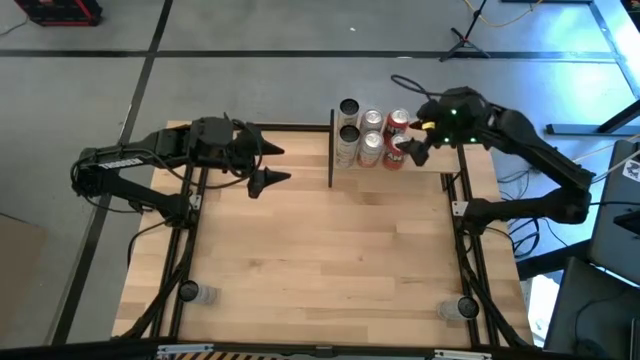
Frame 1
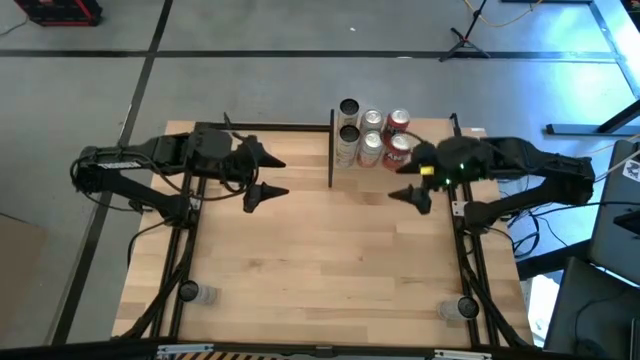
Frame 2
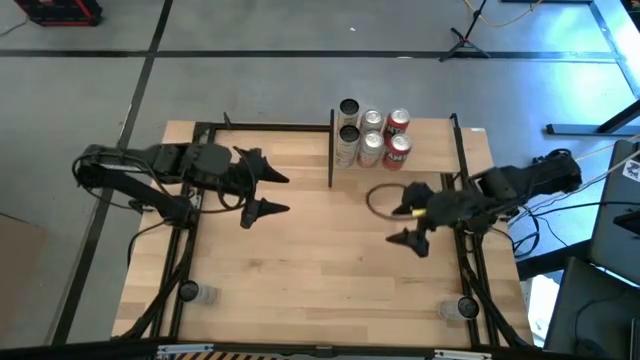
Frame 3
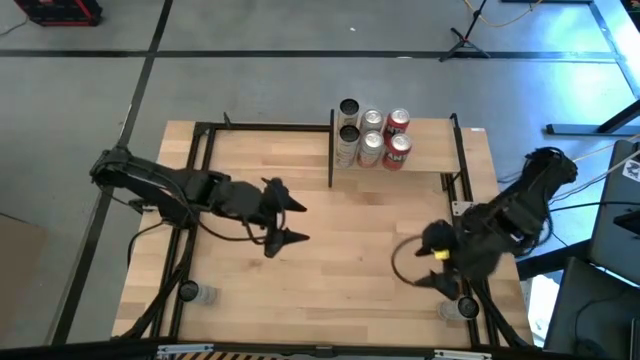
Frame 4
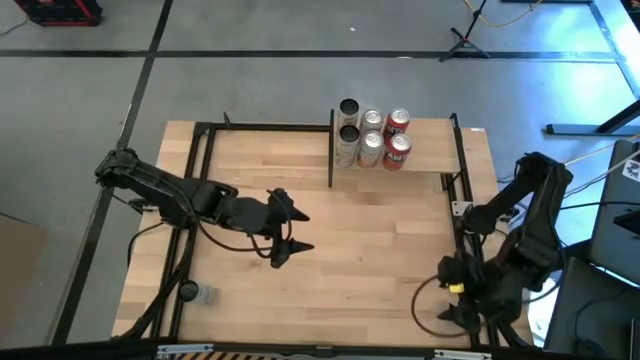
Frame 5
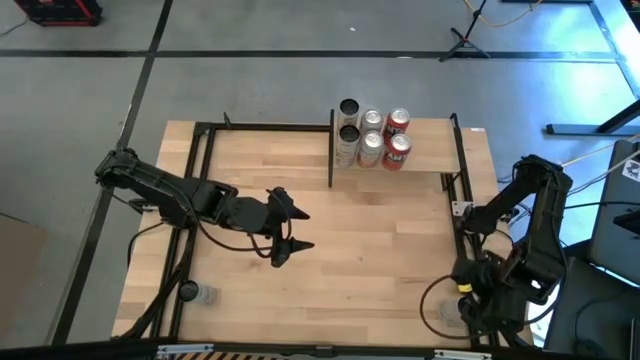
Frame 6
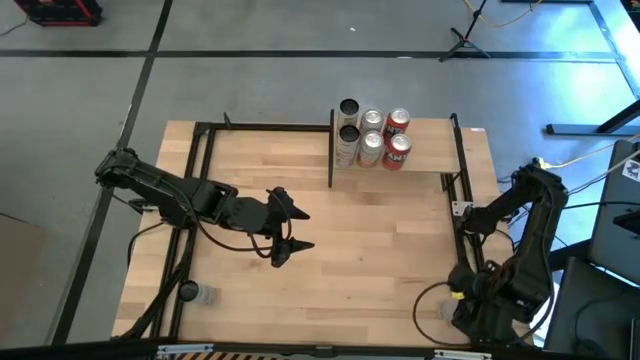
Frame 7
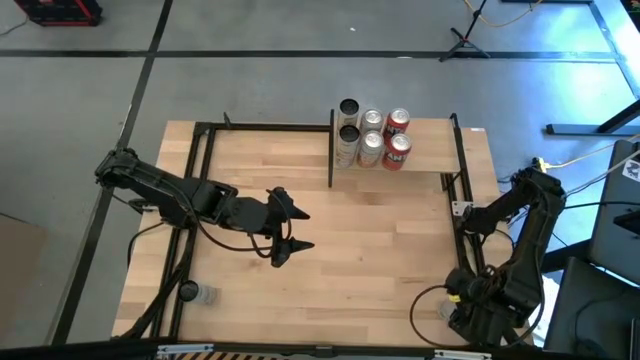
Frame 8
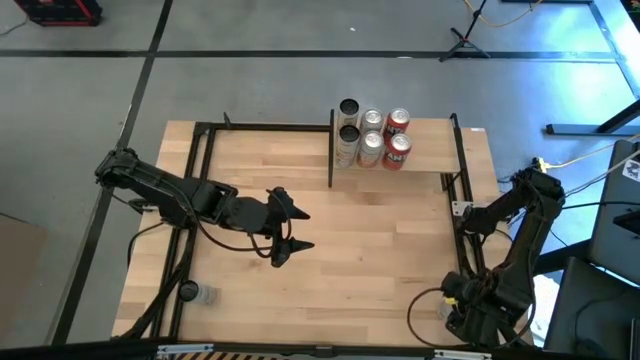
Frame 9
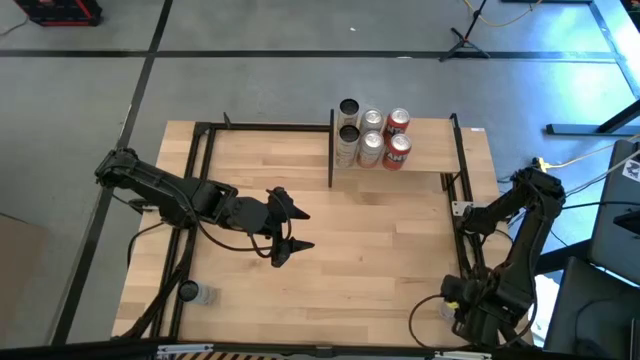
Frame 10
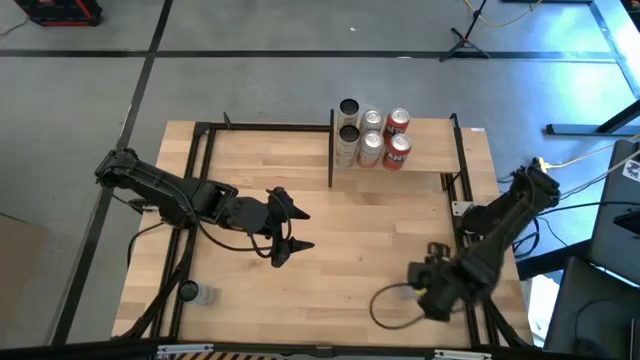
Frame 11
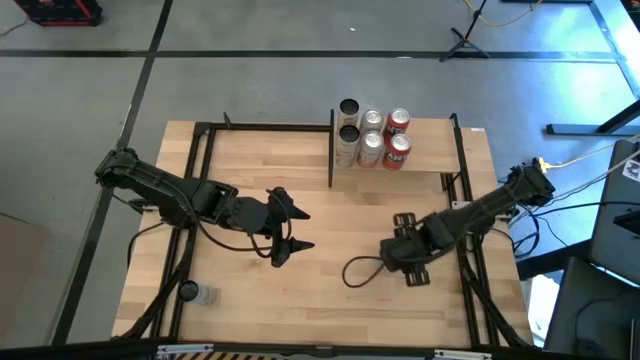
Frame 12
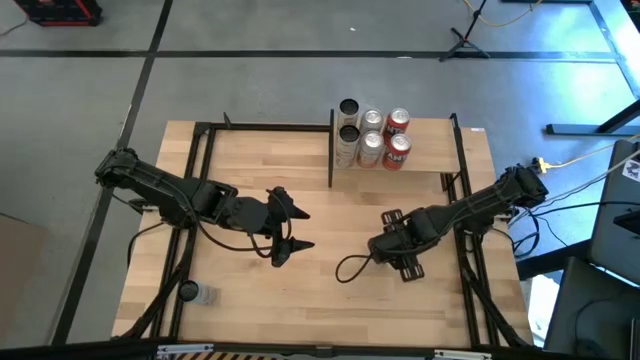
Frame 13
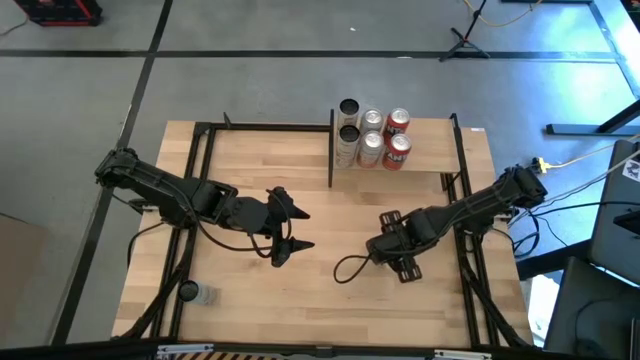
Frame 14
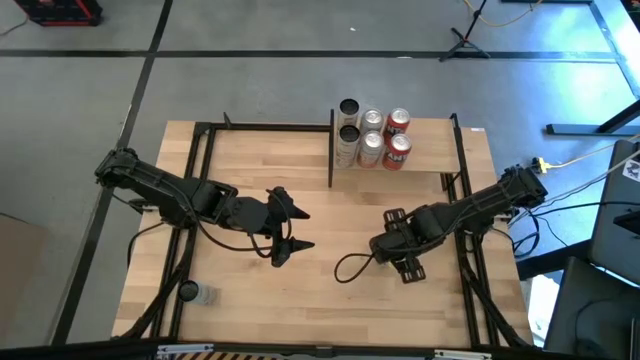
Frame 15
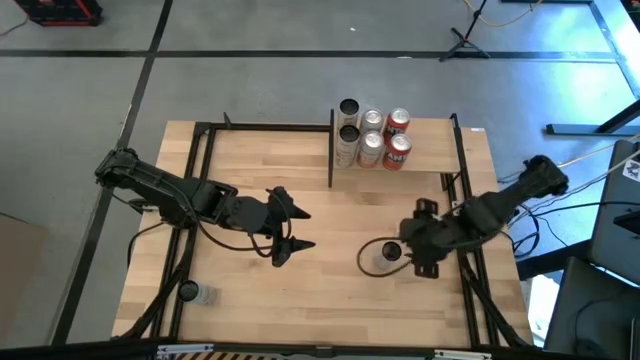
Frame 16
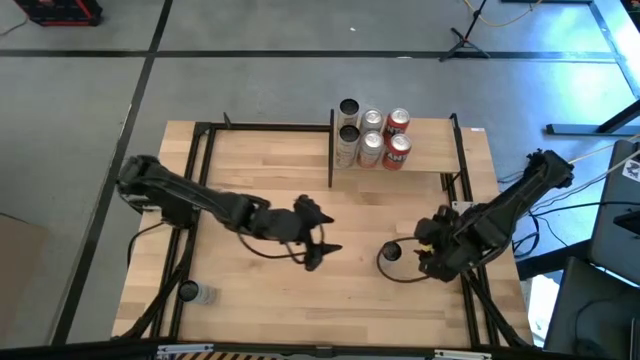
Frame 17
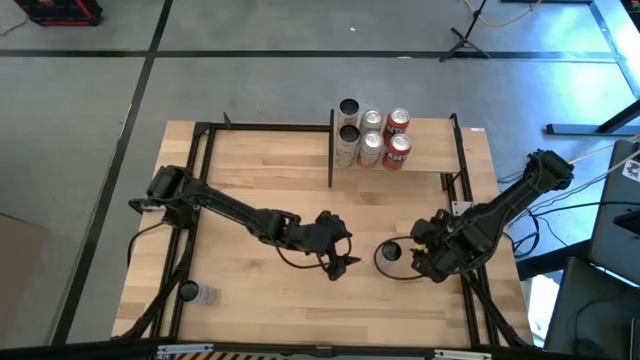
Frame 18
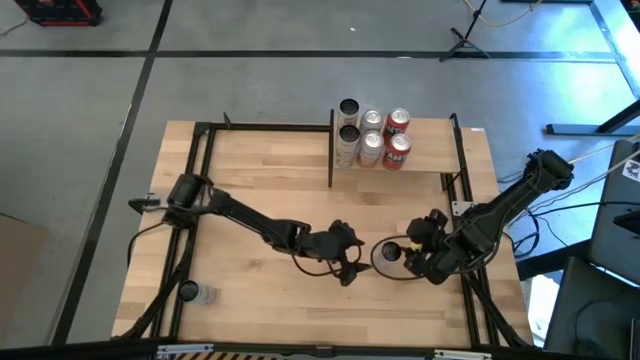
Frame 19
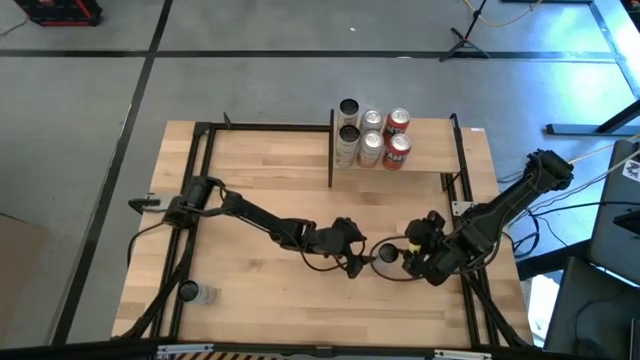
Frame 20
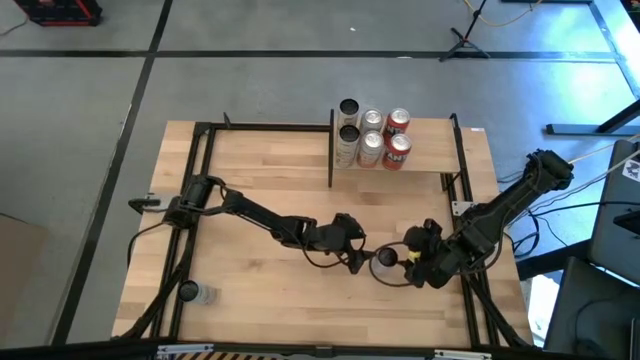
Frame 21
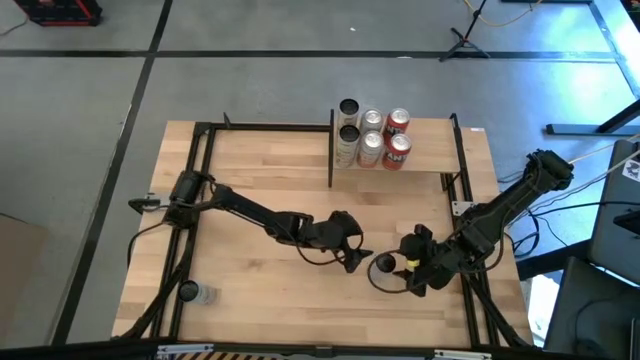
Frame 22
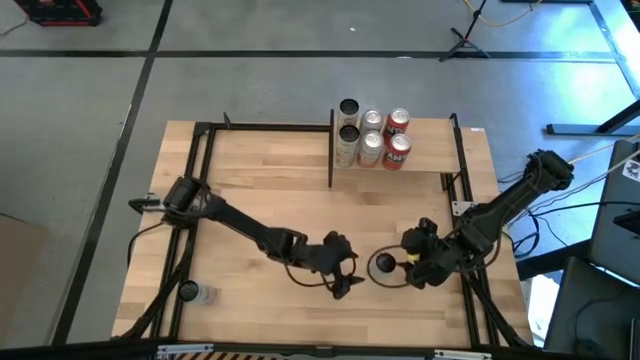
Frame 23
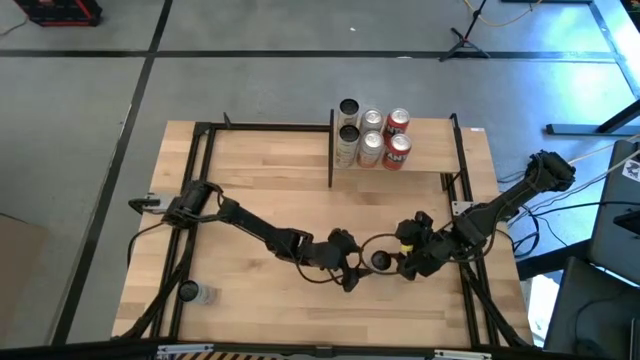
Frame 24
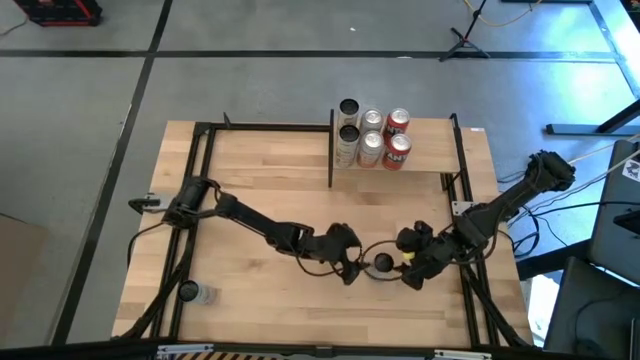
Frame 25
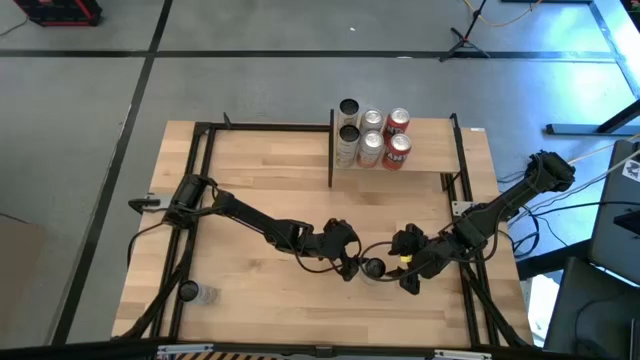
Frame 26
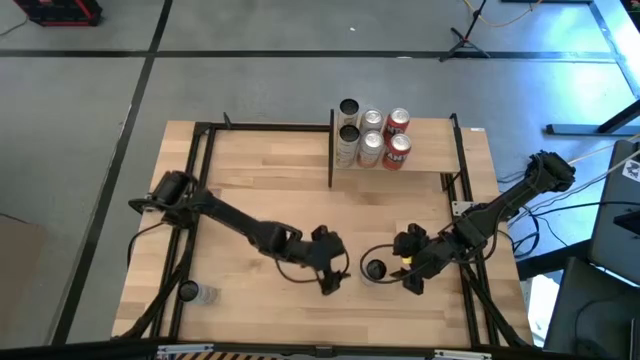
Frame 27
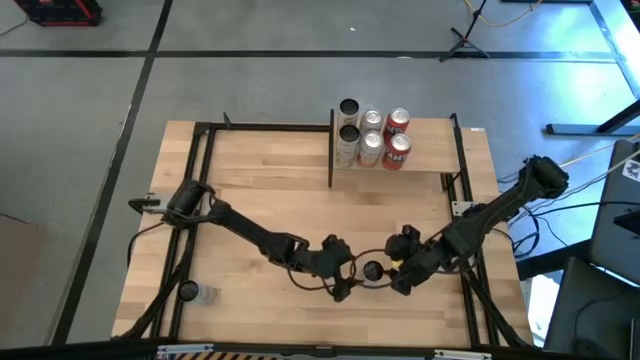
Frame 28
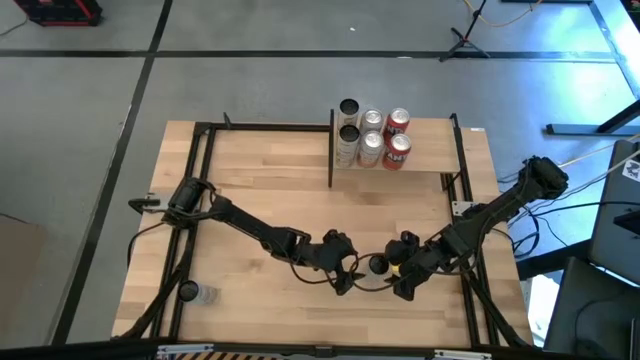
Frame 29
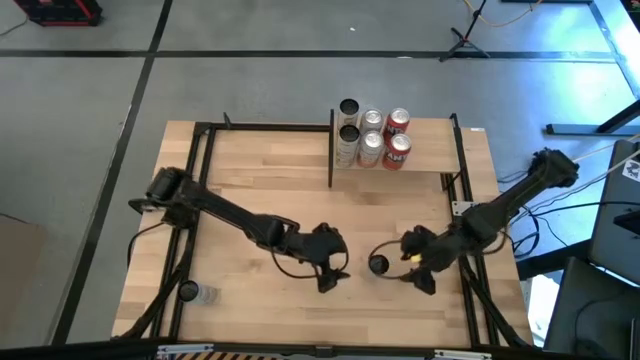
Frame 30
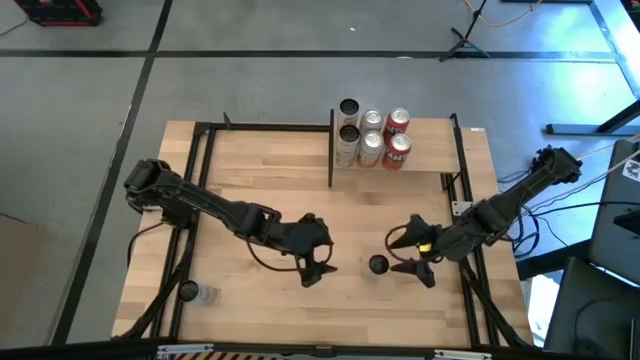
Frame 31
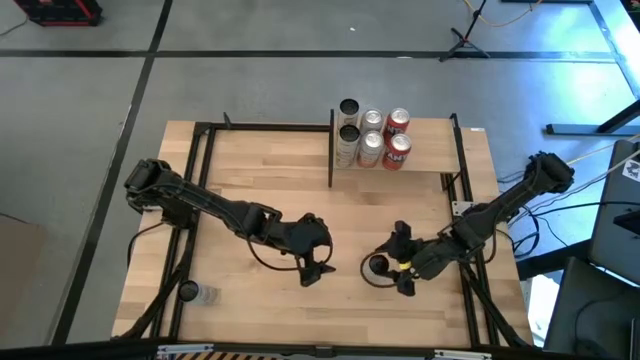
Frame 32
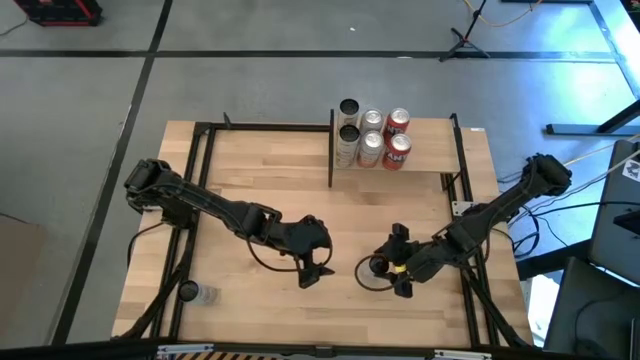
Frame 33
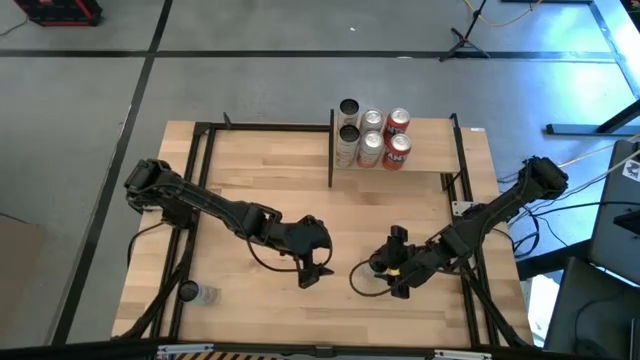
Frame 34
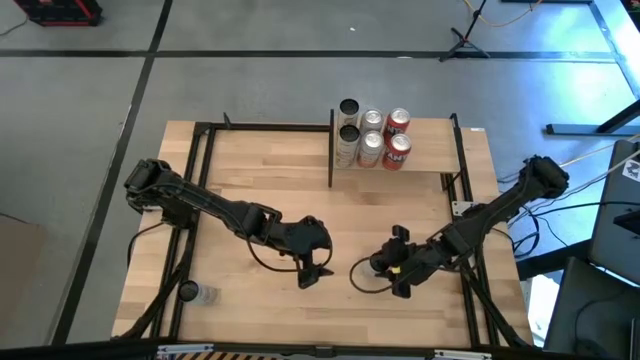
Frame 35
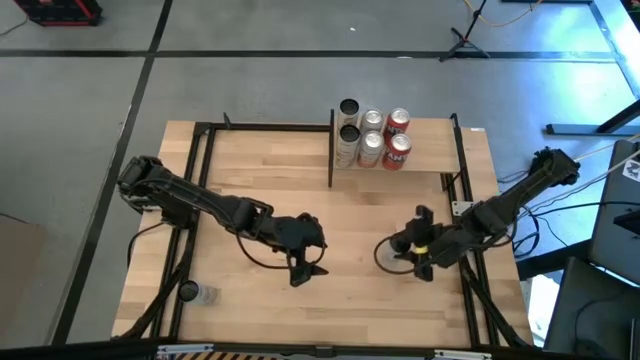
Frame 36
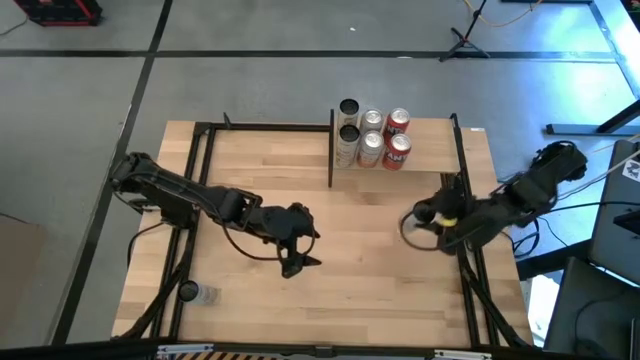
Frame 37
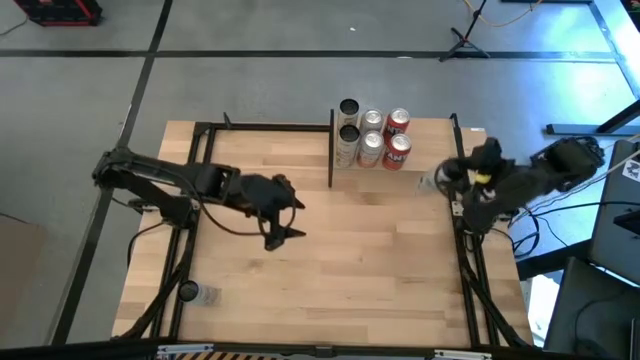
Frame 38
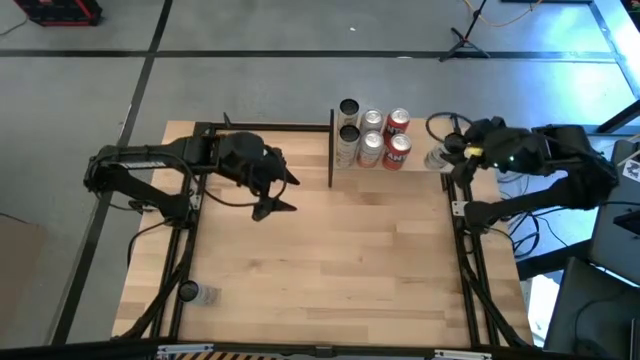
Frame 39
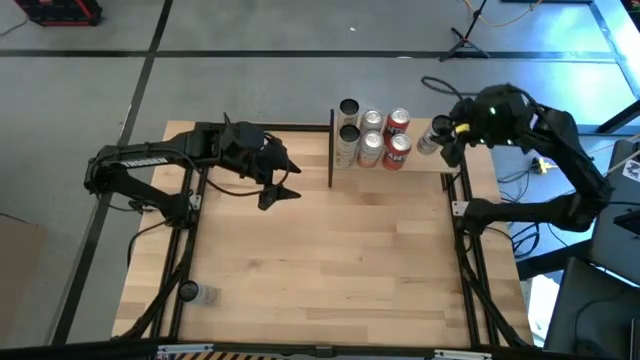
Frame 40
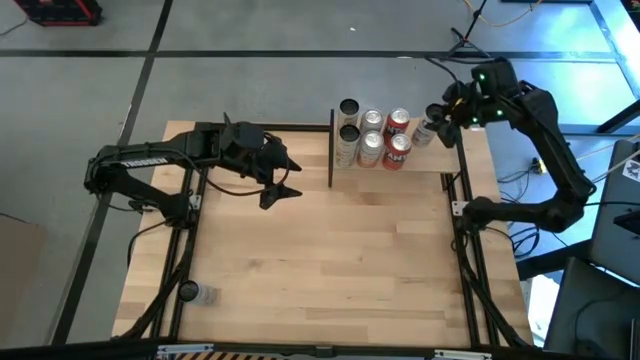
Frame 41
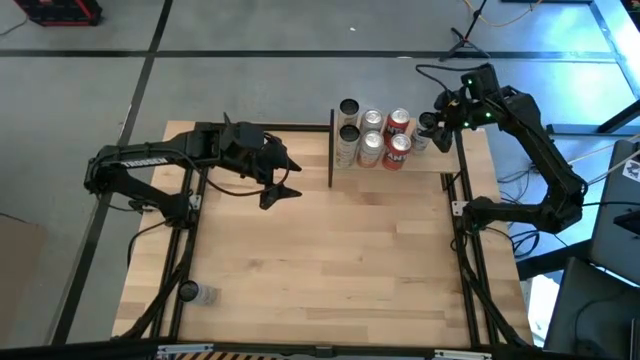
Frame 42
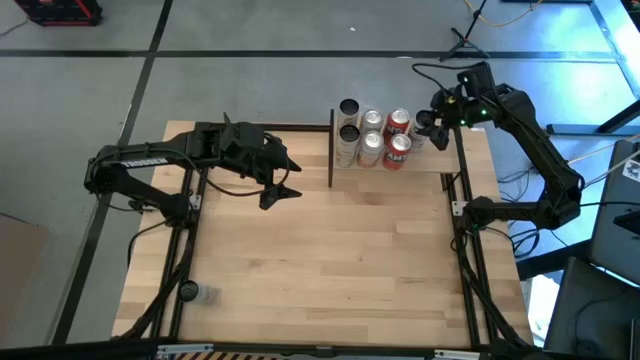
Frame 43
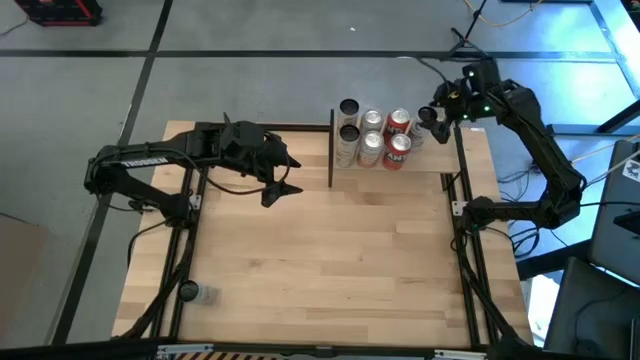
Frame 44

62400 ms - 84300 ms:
Task: Place canned beverage on shelf
Put the right black soda can onto the shelf
